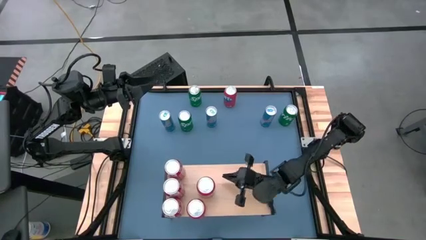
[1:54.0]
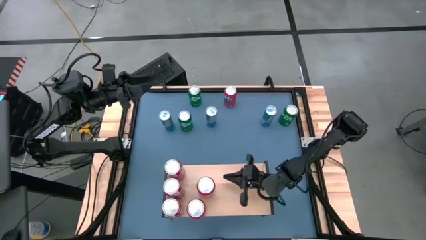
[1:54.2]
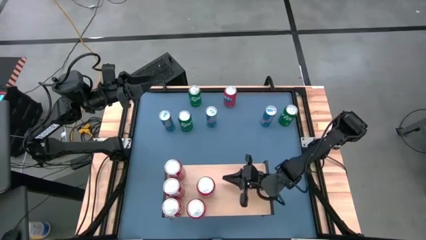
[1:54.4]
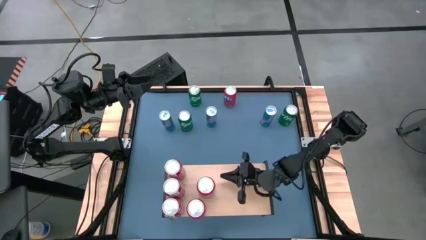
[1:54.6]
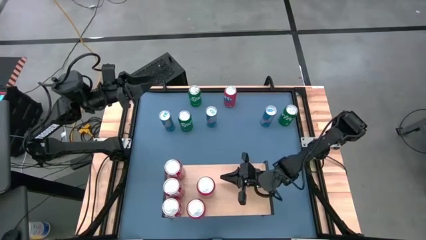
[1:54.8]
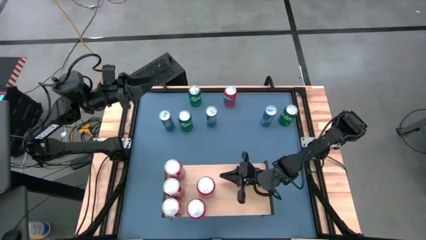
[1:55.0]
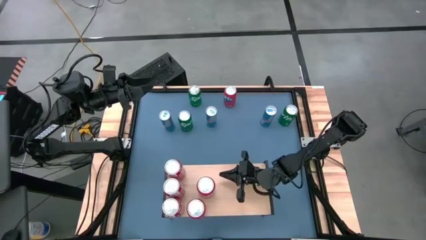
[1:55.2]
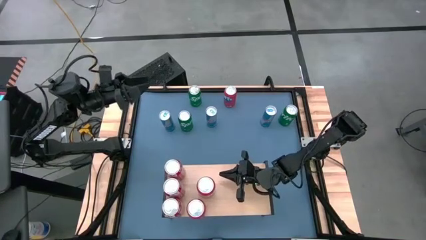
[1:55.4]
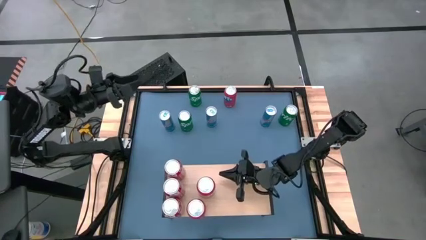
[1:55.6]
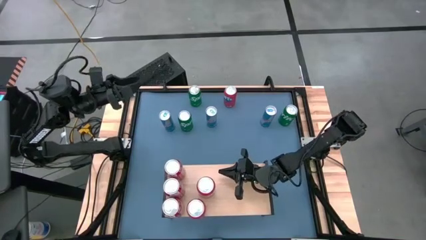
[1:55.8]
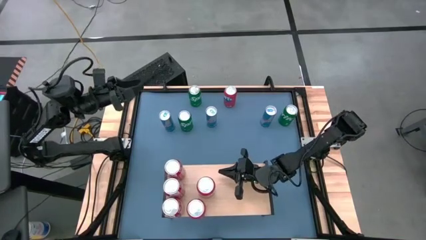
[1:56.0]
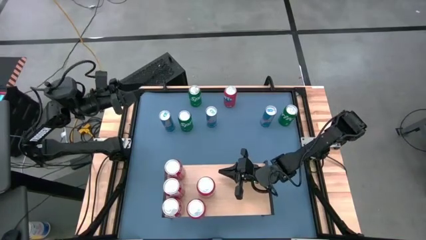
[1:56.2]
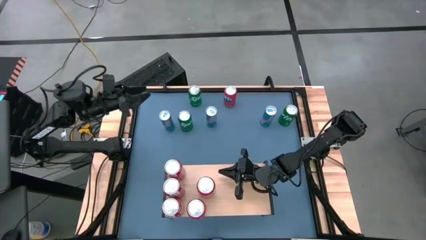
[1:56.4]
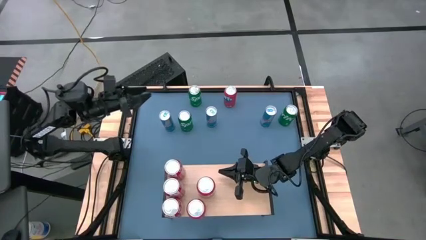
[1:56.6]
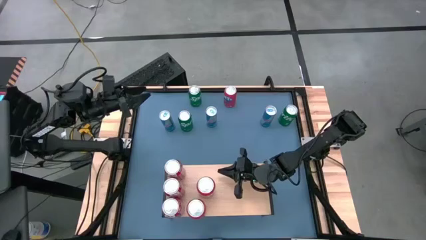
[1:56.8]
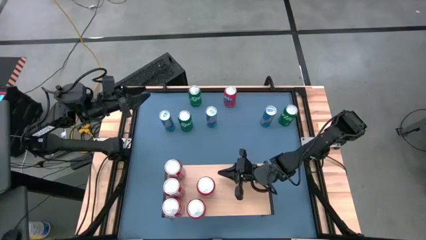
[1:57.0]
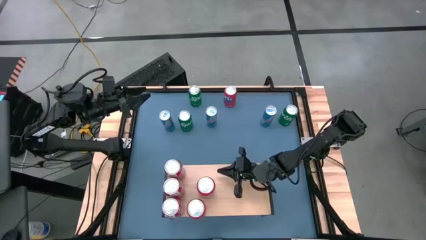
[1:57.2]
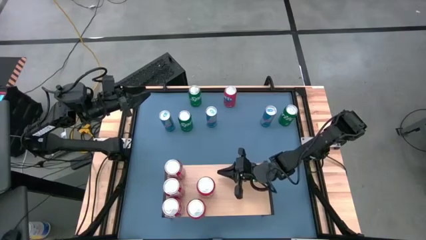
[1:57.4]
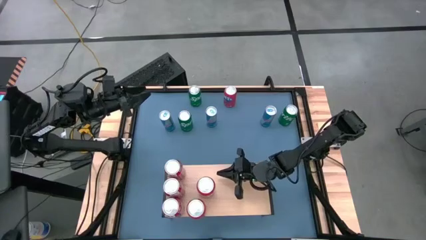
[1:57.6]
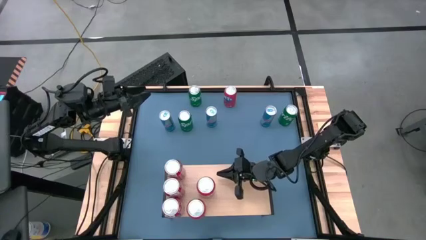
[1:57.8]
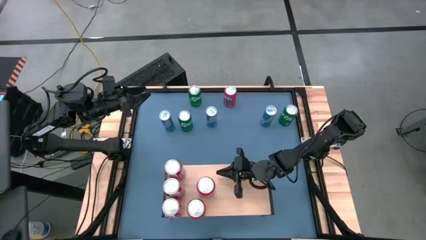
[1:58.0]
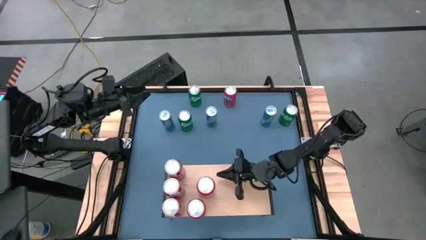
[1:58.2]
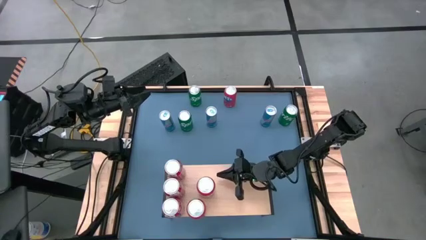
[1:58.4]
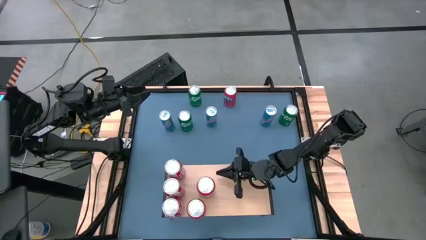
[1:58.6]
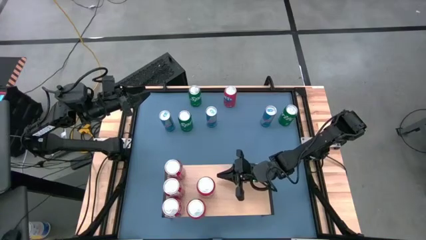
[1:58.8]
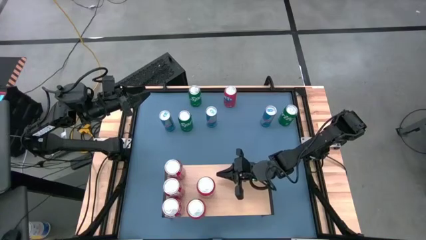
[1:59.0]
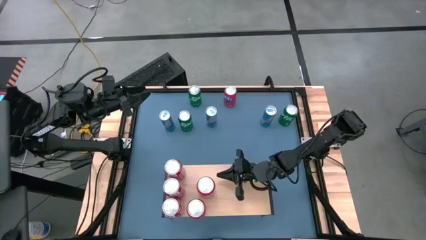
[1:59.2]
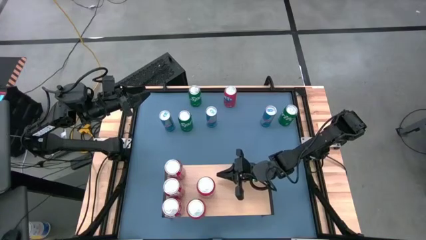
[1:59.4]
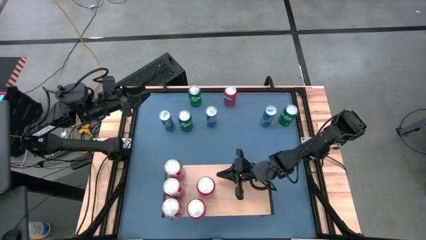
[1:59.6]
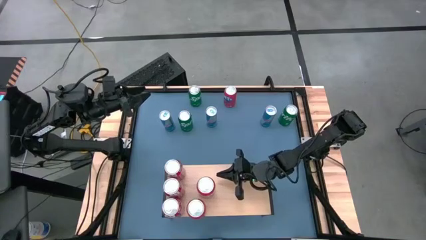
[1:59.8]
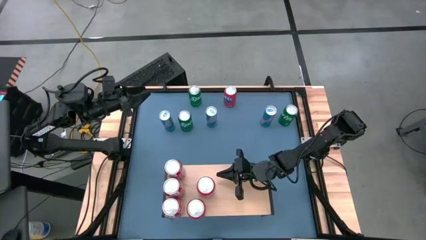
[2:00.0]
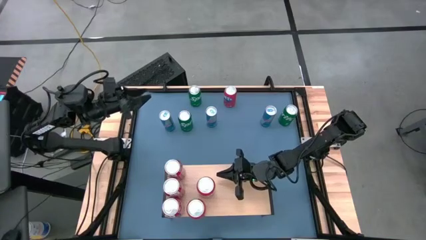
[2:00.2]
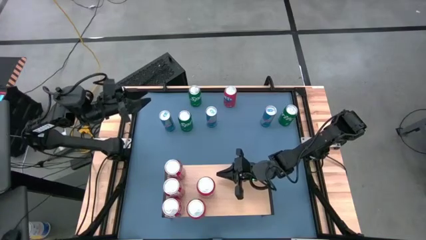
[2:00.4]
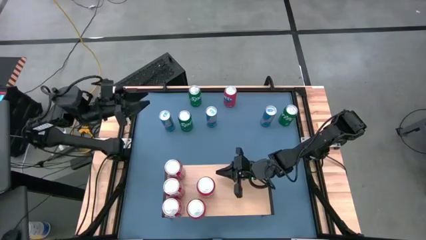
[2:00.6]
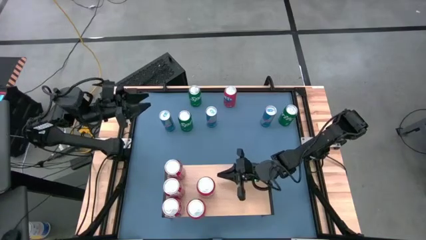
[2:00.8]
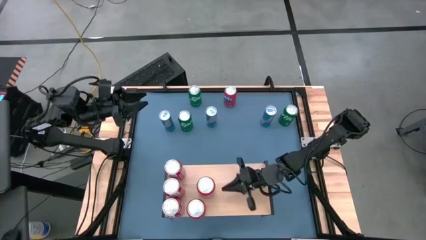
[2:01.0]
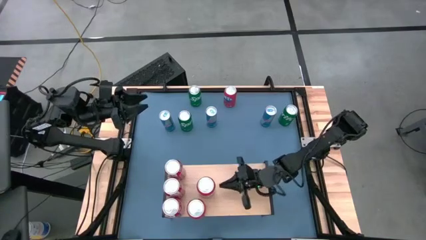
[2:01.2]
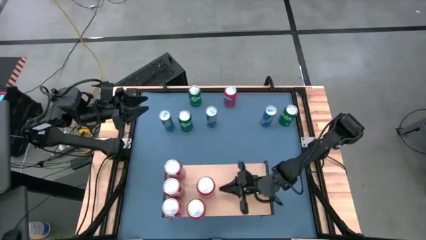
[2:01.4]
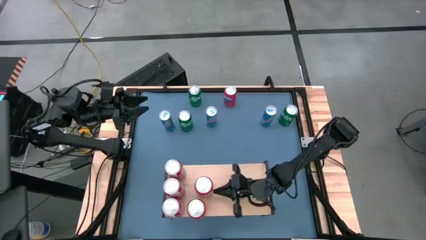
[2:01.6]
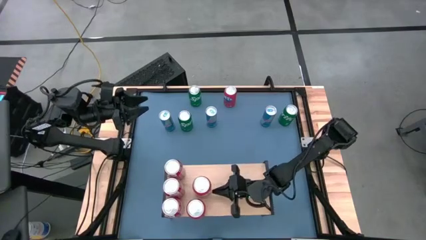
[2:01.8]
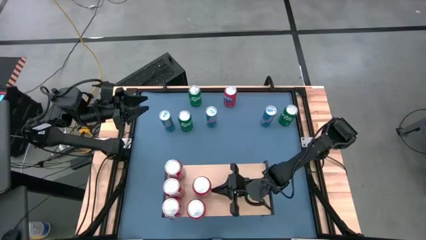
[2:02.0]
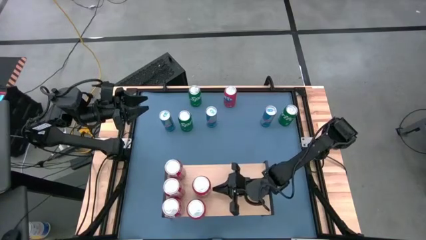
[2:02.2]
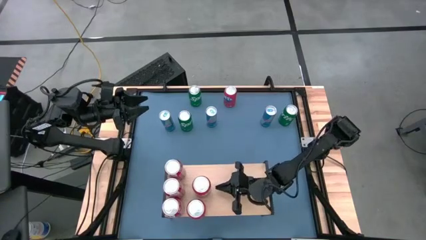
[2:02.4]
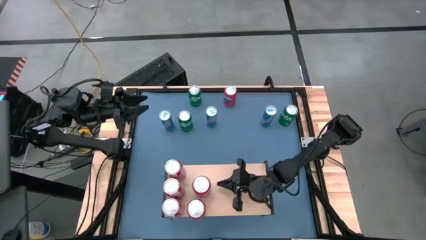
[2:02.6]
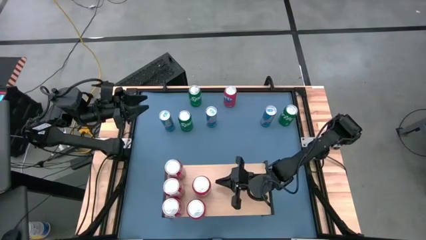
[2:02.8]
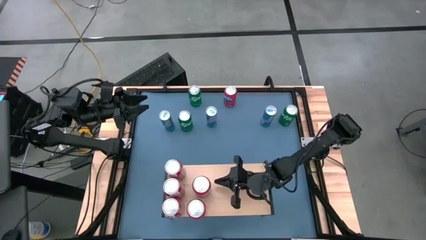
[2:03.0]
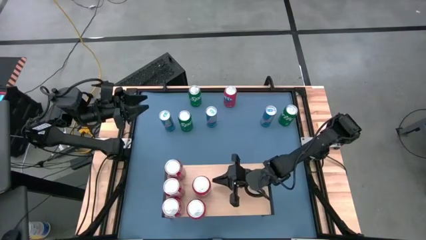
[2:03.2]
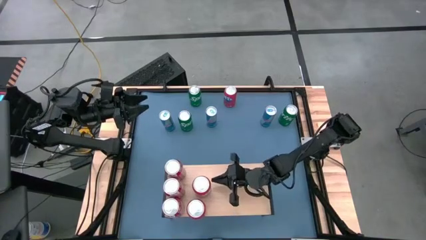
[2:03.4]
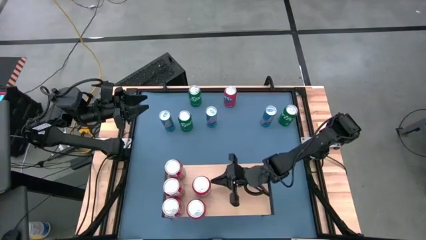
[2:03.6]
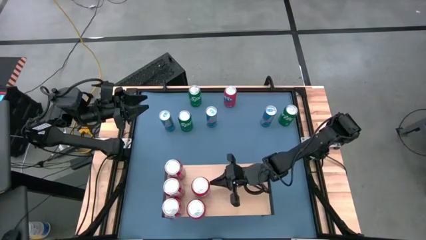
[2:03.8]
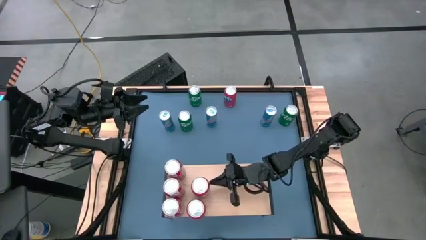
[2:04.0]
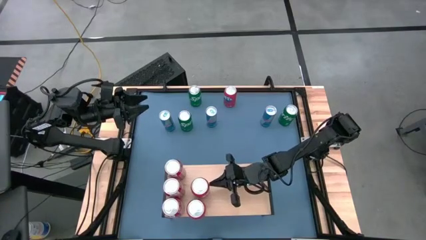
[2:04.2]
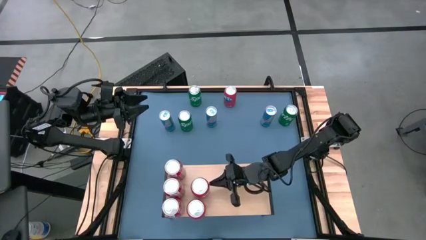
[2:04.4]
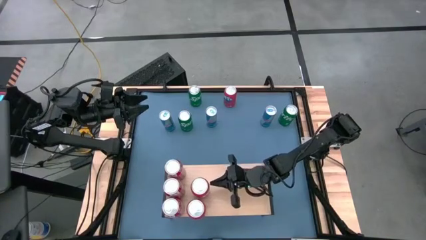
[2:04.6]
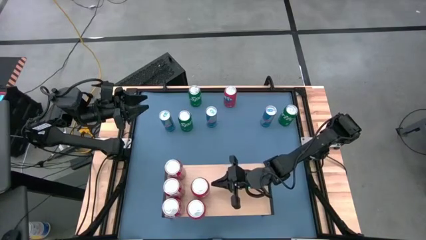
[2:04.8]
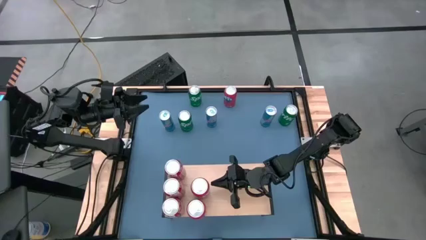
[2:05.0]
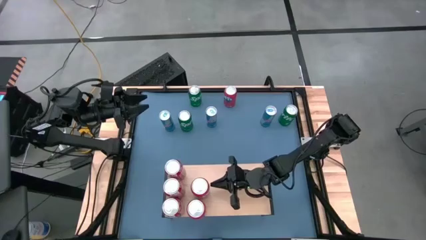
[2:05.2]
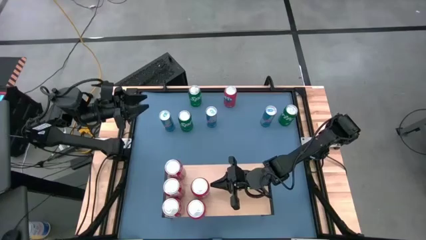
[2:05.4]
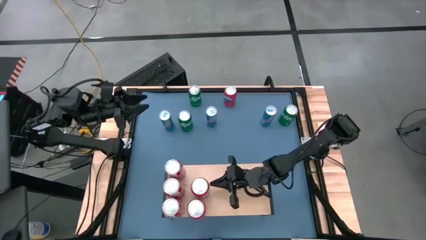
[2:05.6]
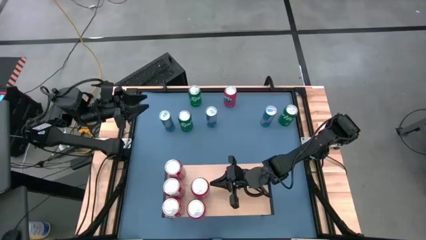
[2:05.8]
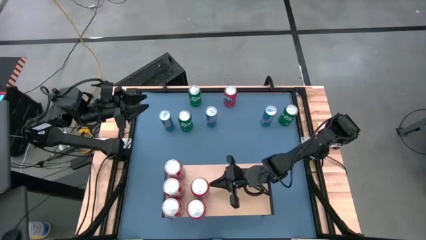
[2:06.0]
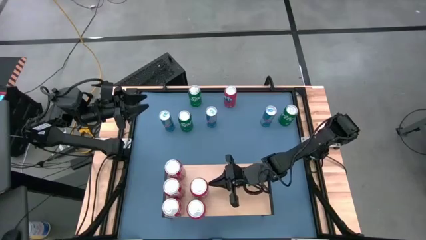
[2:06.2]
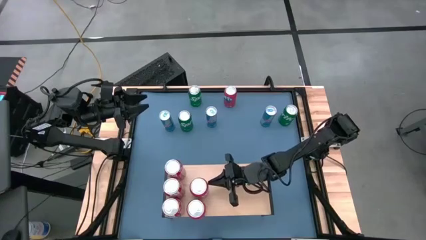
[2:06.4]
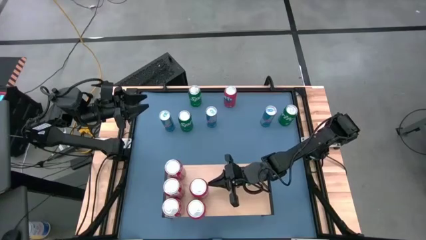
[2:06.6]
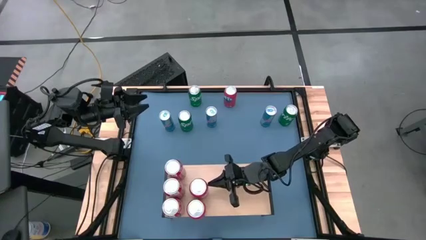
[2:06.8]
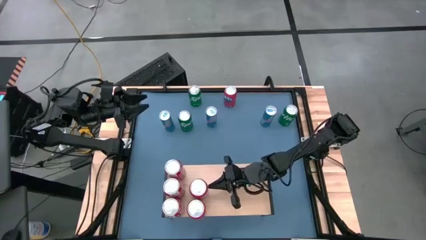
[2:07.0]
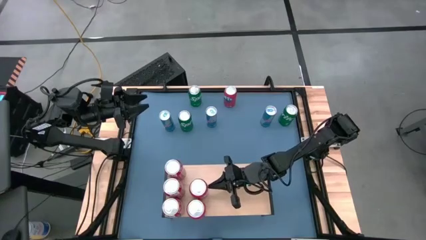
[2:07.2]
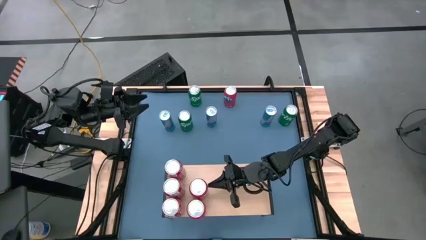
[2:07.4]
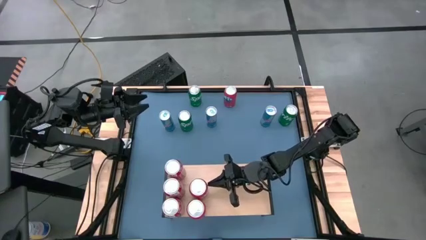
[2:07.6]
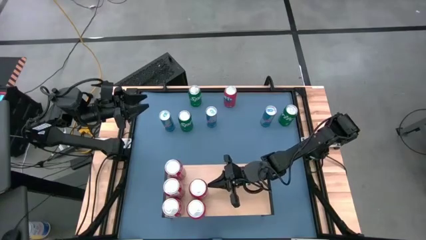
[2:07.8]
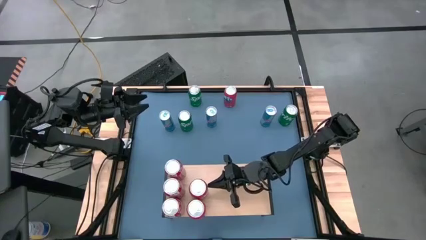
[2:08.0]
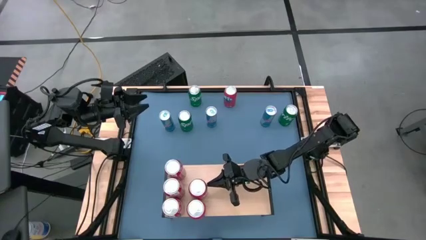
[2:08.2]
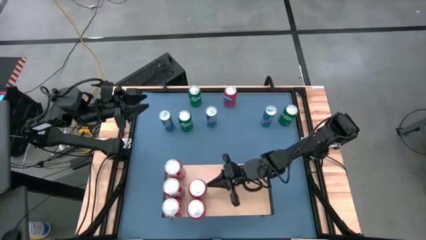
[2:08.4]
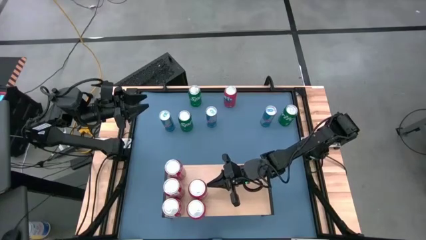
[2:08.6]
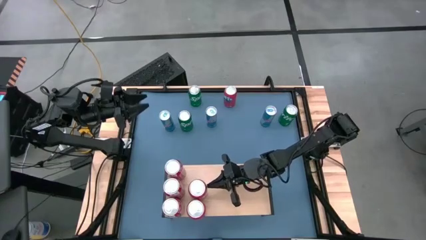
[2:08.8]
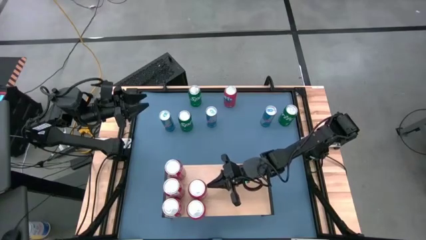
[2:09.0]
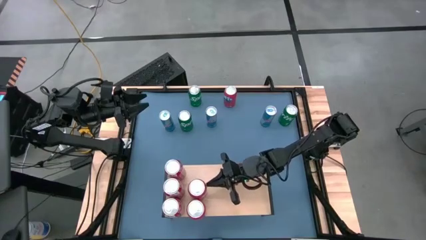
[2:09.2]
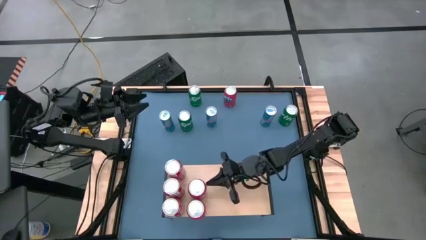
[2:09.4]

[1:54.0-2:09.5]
Task: Place canned beverage on shelf
Put the bottom orange soda can on the shelf aligned with the other orange soda can

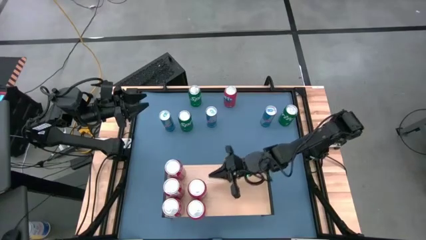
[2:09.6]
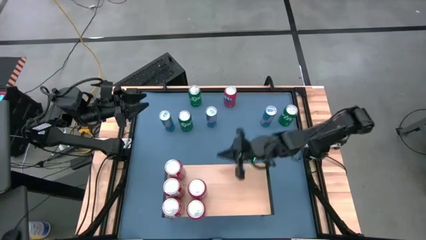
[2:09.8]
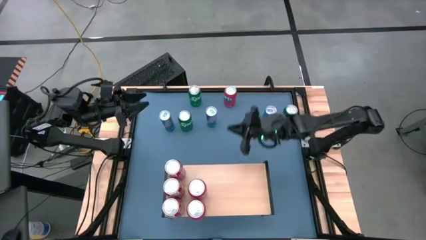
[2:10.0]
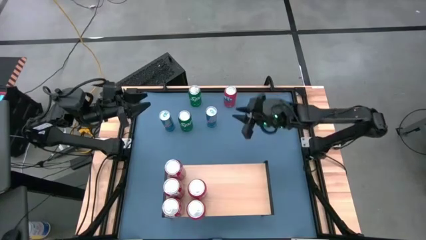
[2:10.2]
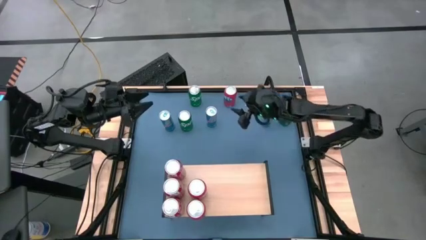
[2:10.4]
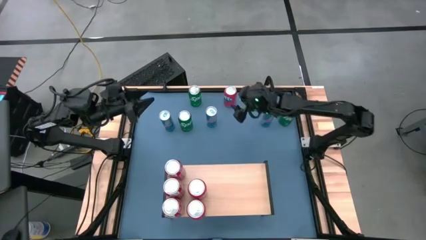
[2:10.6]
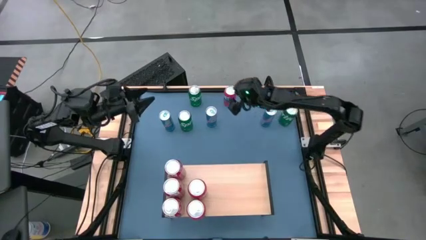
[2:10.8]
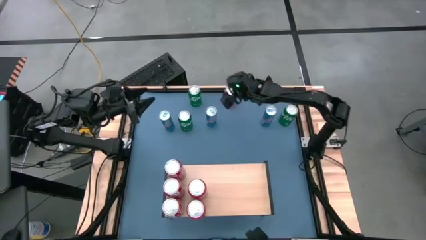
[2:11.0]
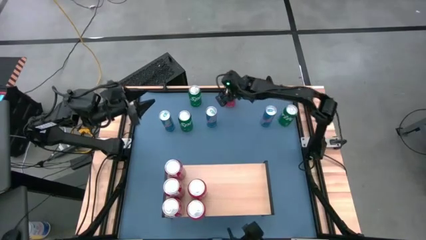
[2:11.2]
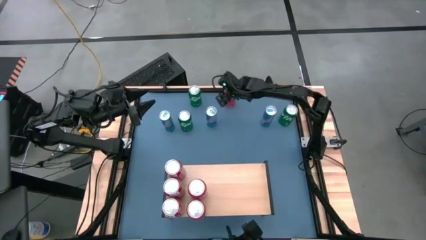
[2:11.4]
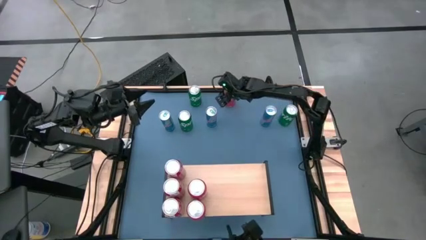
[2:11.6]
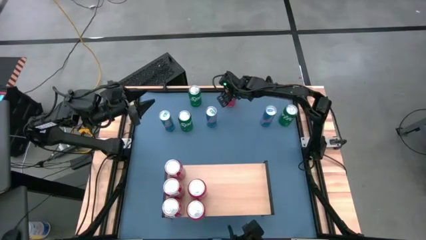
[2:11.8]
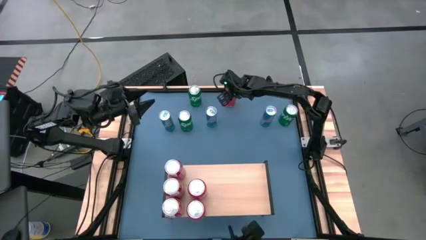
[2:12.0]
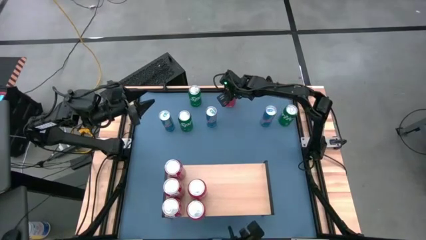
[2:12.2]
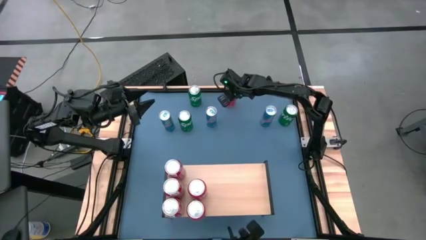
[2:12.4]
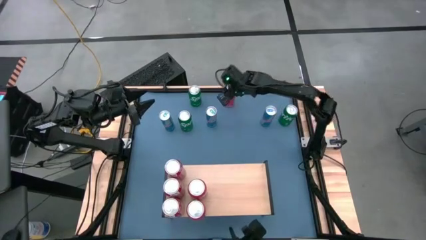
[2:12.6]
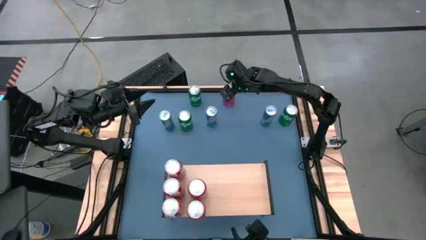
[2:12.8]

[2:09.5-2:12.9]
Put the orange soda can on the shelf aligned with the other orange soda cans
